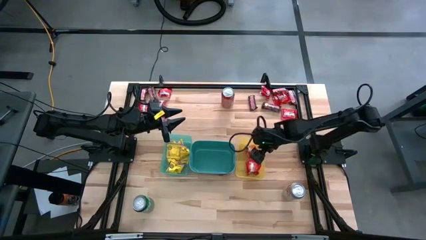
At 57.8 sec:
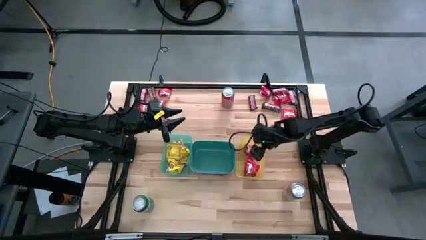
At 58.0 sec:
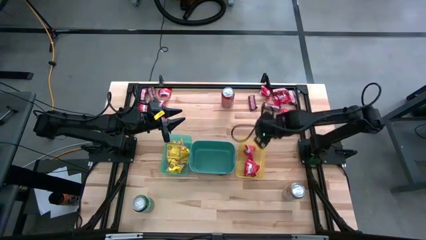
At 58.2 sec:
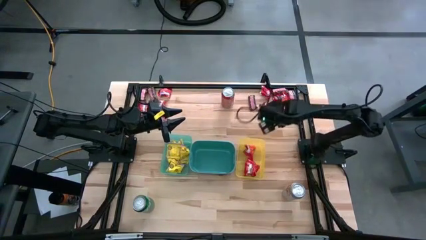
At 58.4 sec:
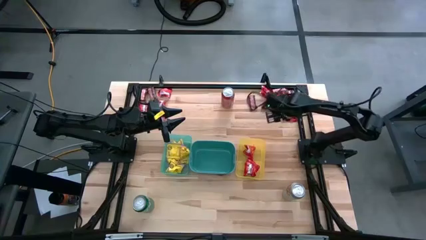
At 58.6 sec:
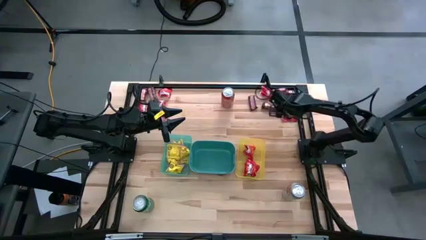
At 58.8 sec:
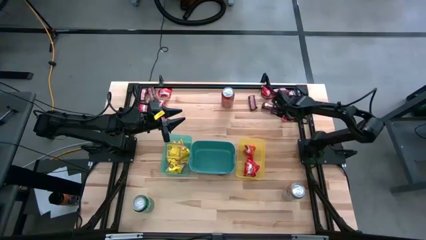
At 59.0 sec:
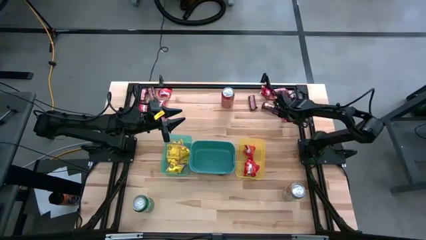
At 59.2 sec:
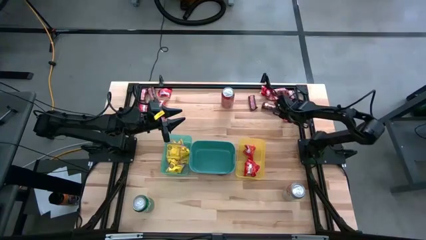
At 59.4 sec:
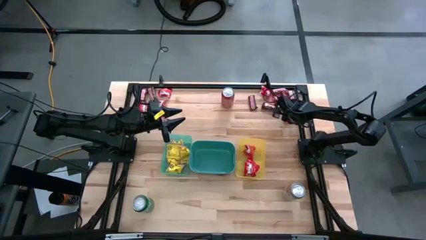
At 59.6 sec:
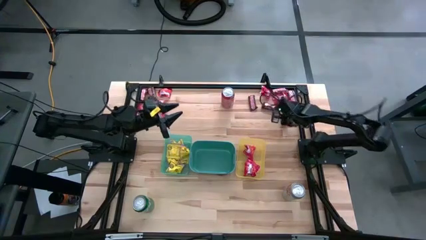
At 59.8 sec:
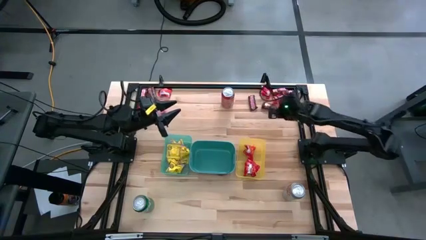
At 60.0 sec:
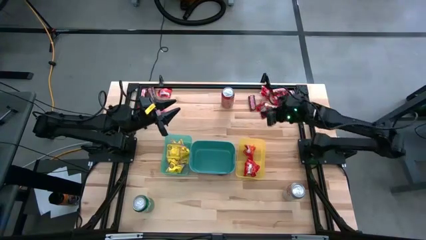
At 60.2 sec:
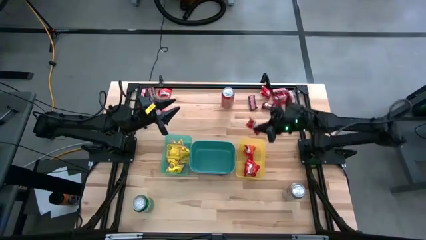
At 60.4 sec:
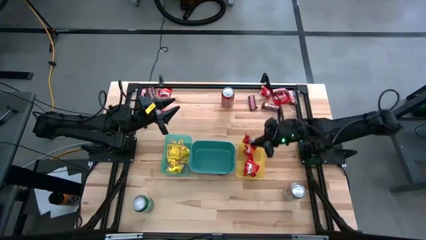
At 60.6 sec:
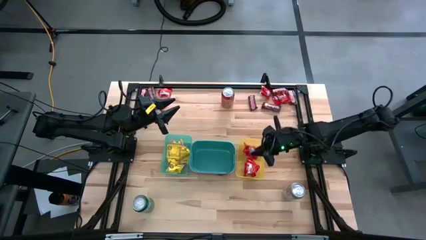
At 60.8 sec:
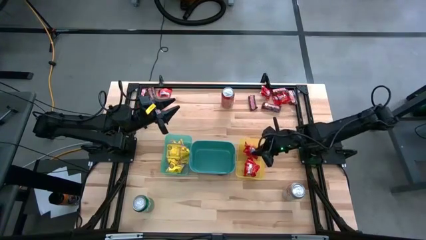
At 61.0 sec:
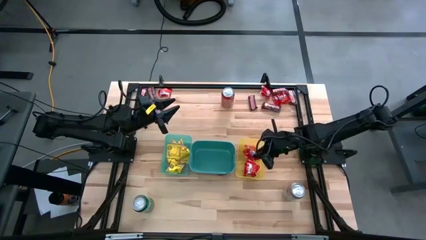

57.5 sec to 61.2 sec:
Task: Sort candy
Put the red candy into the yellow bin

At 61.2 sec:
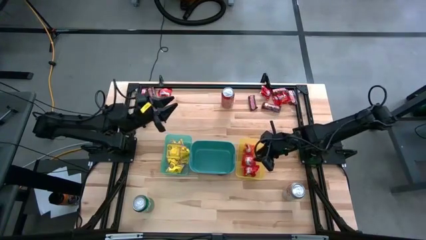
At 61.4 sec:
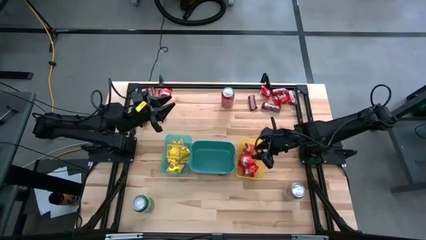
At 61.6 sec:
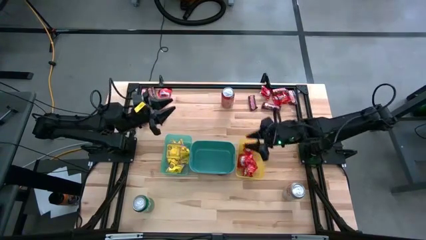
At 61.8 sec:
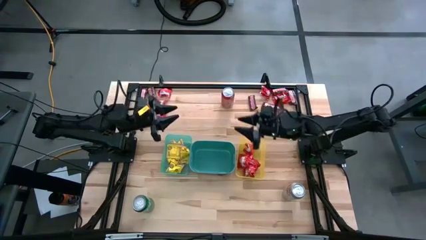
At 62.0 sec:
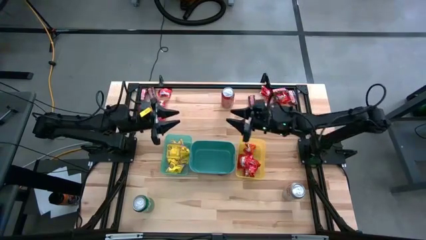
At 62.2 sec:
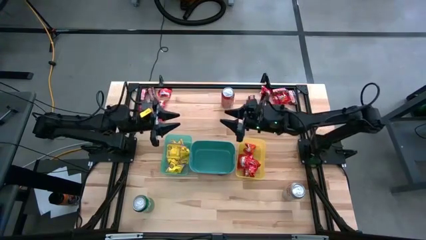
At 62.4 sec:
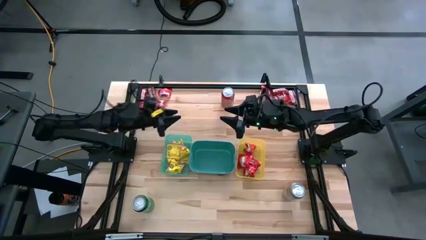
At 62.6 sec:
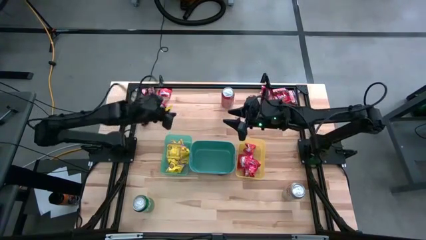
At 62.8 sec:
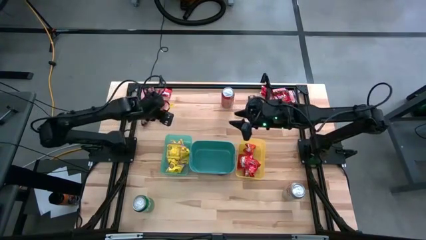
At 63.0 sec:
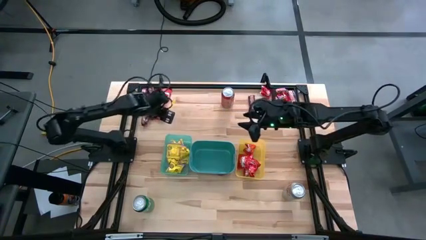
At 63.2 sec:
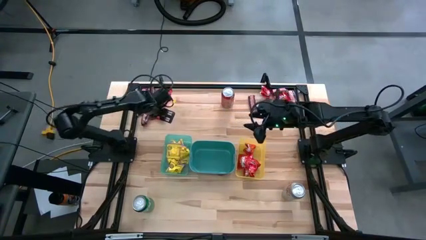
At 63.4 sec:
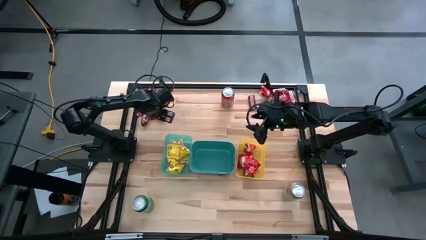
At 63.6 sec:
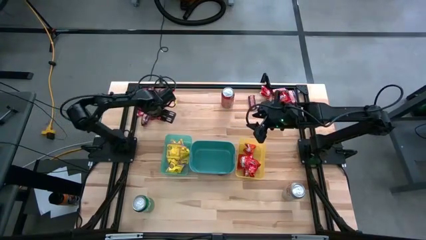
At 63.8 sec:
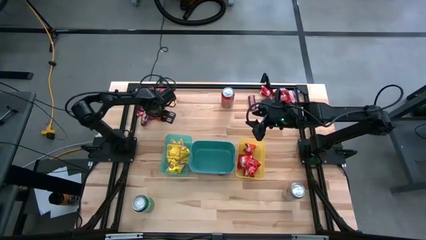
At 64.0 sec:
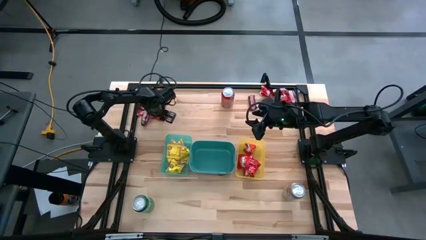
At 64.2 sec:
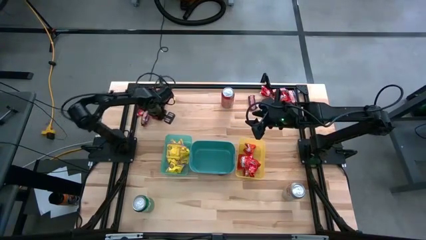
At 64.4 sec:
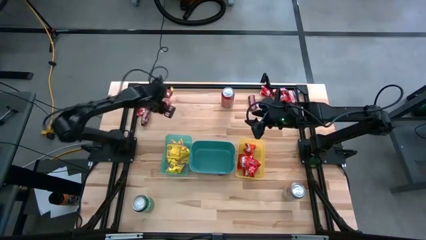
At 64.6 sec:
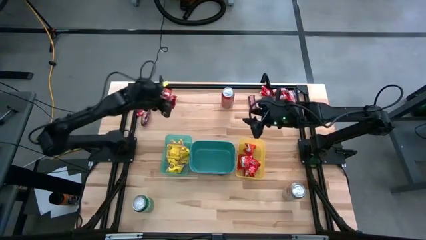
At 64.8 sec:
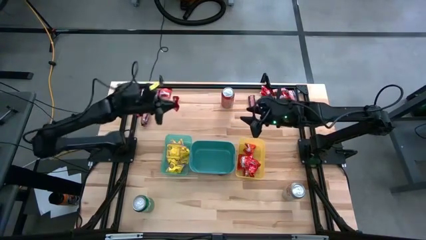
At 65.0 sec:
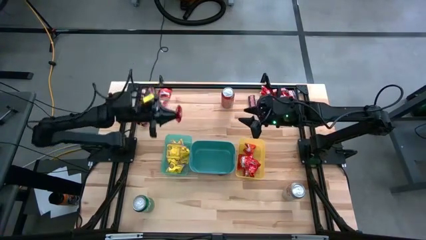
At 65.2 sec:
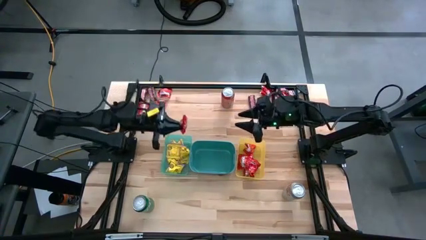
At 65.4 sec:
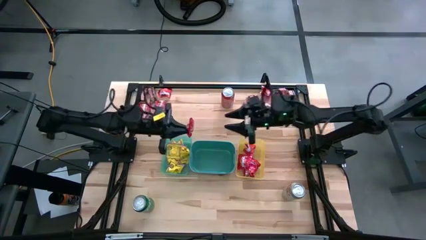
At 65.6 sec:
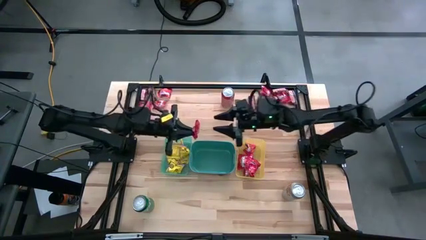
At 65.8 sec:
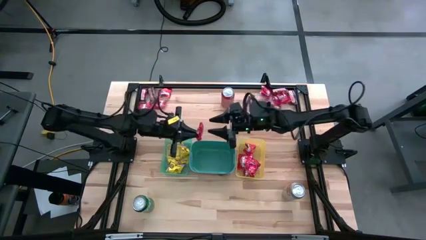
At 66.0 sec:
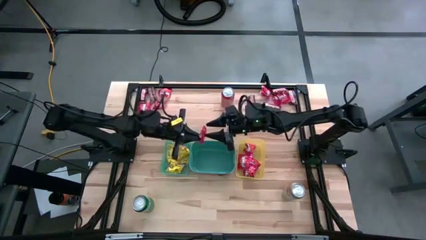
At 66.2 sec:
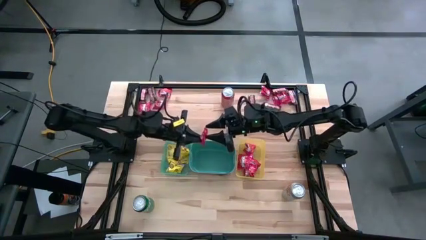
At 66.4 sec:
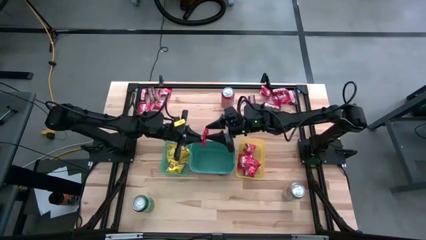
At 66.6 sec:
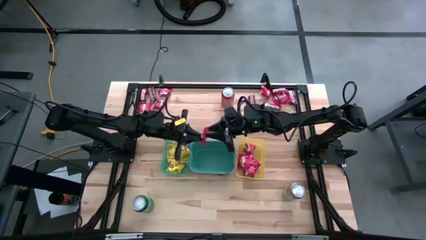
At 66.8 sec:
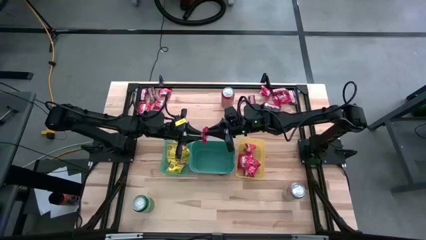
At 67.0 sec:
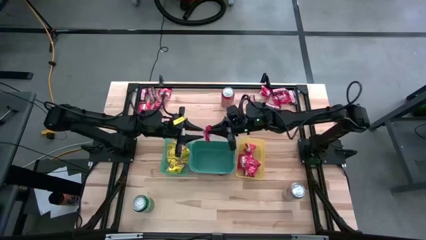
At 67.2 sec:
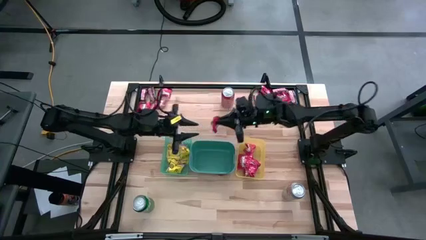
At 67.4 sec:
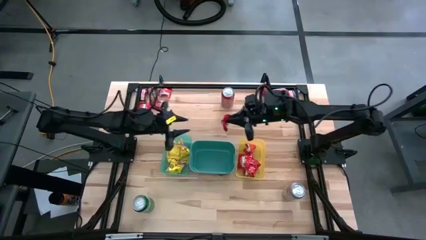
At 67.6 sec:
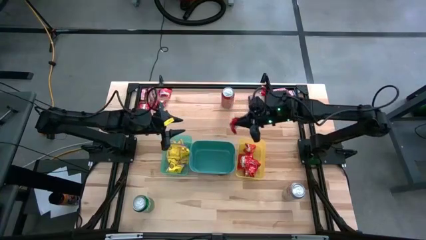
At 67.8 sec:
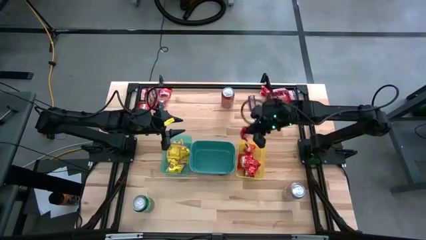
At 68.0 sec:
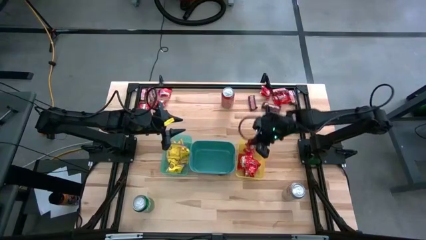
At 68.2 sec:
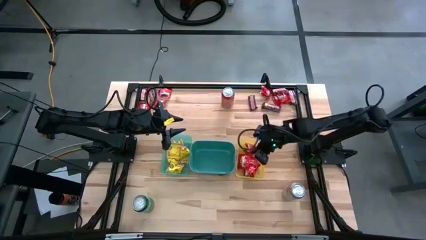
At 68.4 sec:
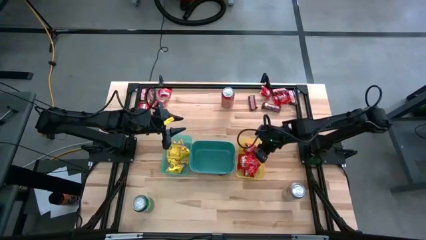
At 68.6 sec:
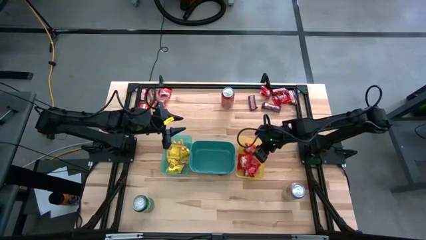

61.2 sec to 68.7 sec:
Put the red candy into the yellow bin

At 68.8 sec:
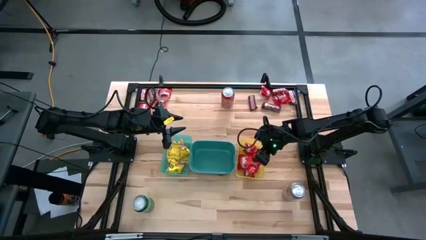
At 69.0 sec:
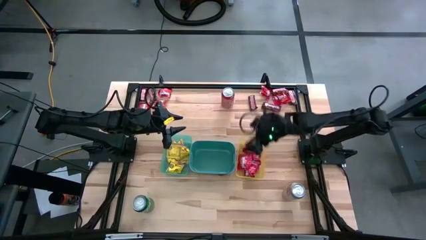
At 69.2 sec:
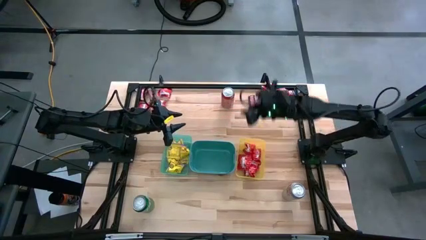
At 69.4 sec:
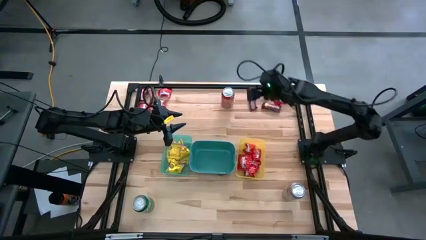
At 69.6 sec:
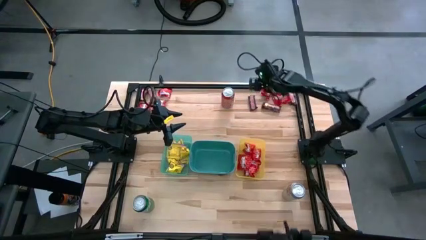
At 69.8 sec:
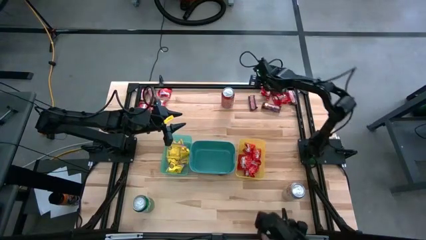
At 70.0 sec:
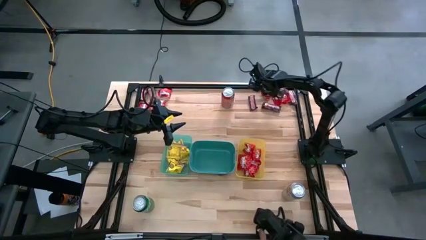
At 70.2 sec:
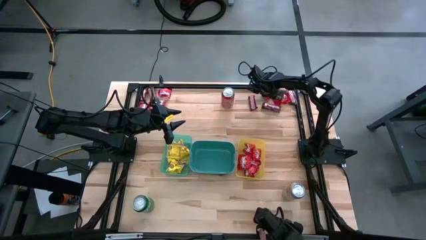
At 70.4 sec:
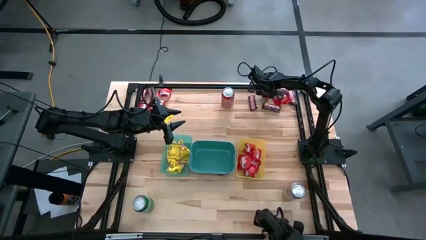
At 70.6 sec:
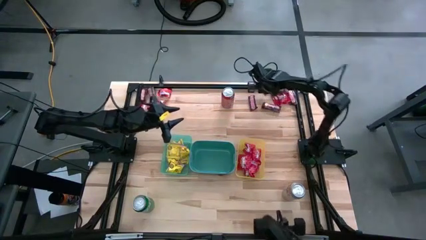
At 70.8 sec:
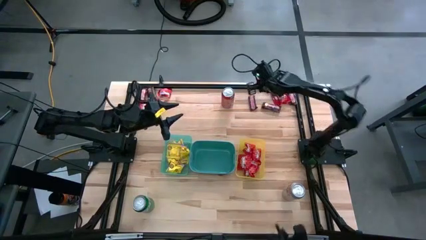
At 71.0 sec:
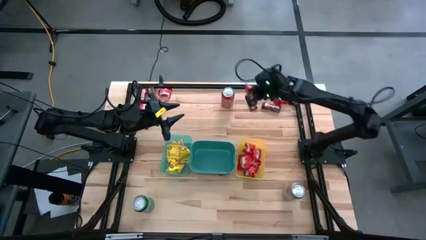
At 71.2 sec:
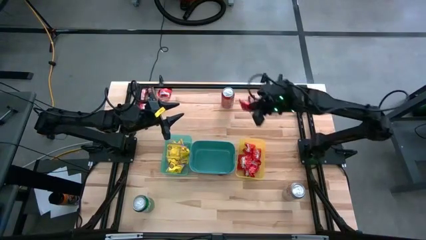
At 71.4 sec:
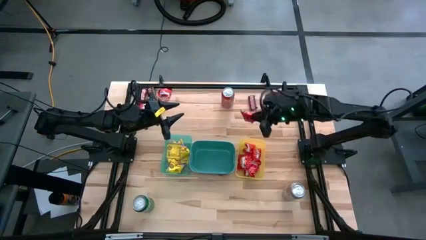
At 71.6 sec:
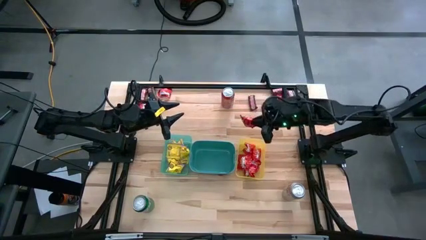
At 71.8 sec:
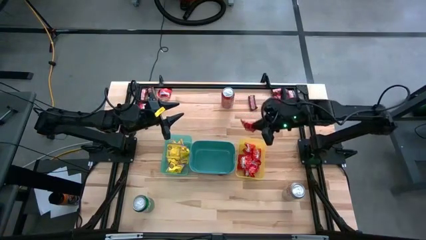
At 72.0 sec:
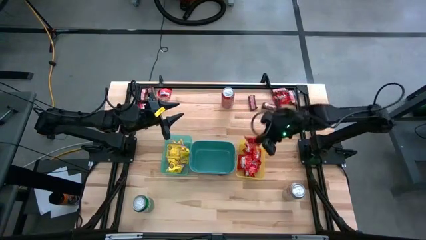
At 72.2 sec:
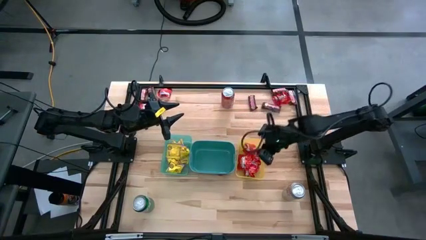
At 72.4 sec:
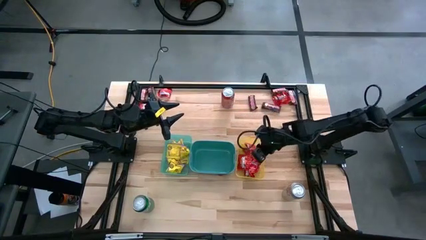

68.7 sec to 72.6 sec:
Put the red candy into the yellow bin
